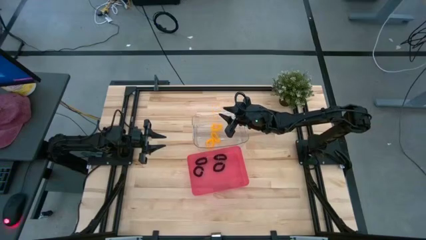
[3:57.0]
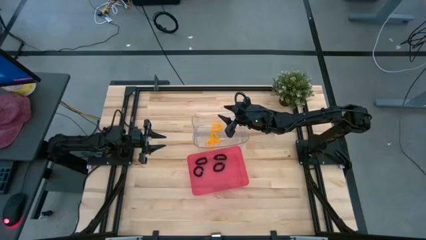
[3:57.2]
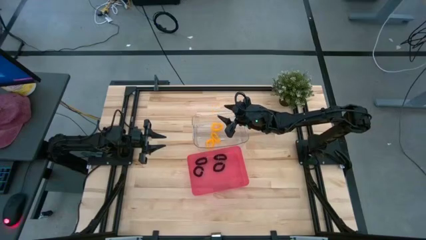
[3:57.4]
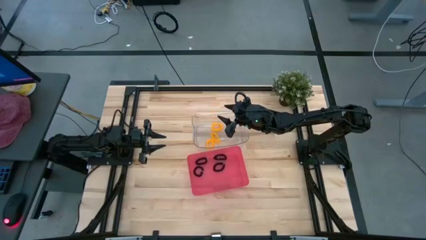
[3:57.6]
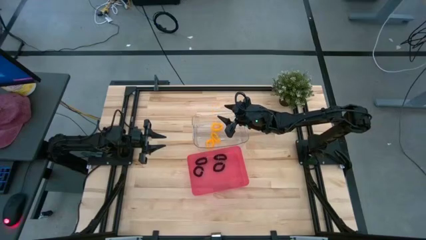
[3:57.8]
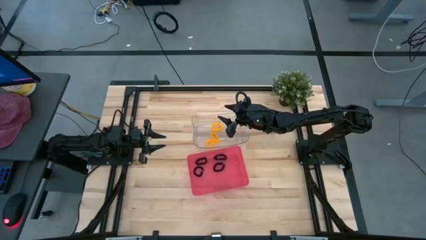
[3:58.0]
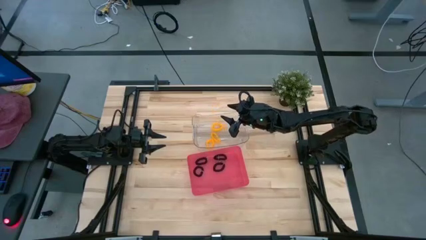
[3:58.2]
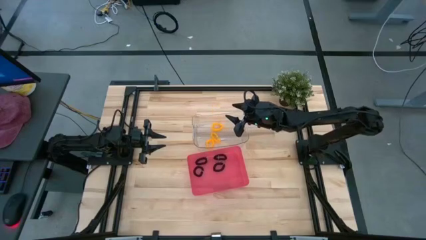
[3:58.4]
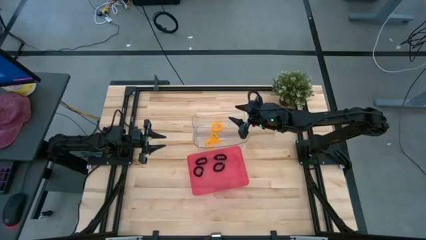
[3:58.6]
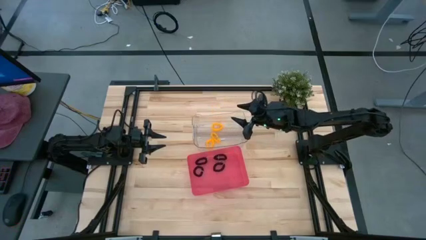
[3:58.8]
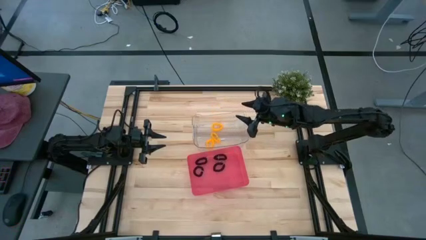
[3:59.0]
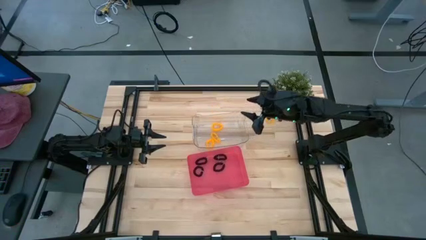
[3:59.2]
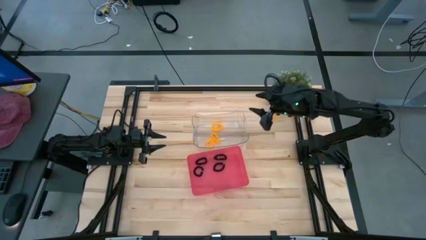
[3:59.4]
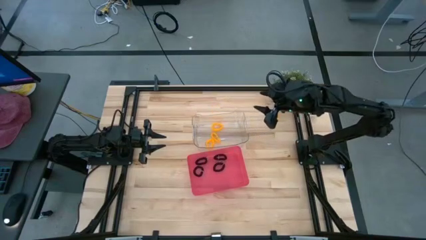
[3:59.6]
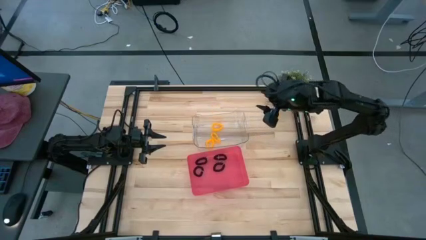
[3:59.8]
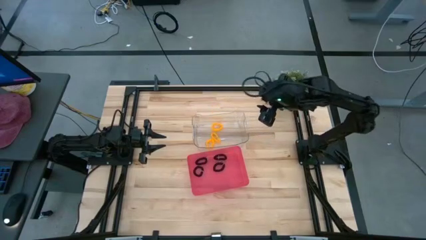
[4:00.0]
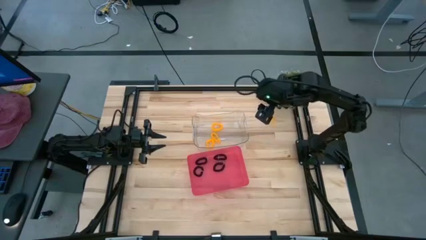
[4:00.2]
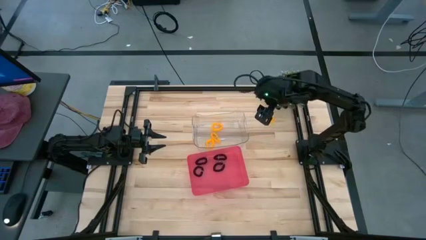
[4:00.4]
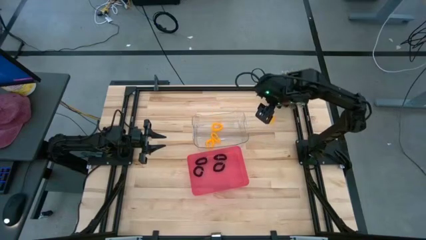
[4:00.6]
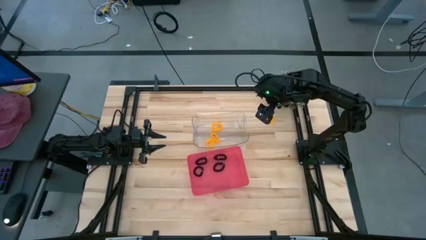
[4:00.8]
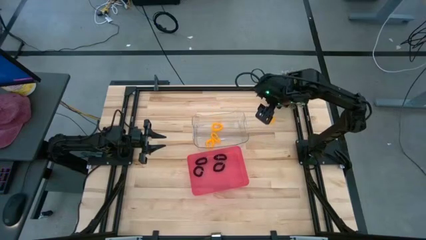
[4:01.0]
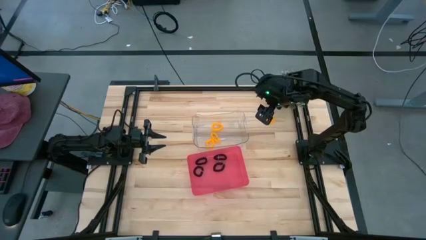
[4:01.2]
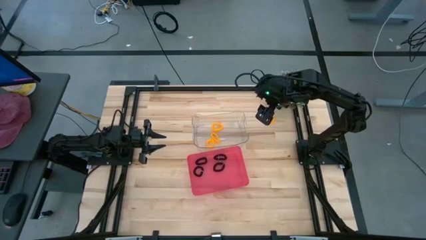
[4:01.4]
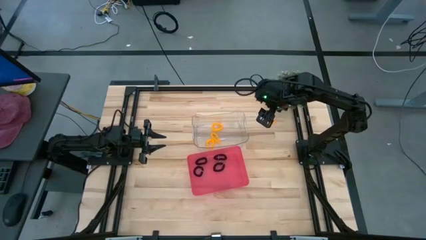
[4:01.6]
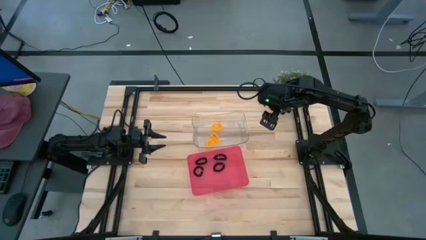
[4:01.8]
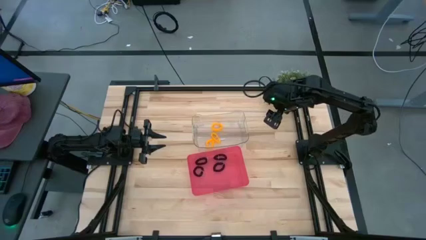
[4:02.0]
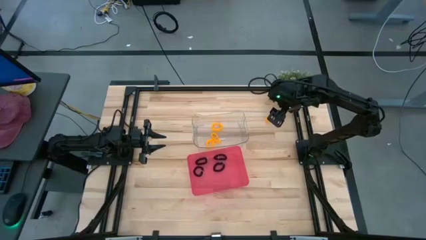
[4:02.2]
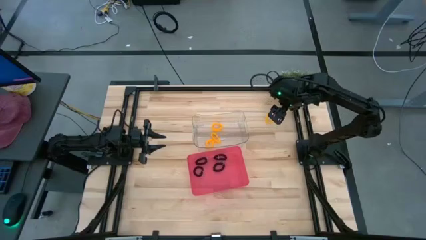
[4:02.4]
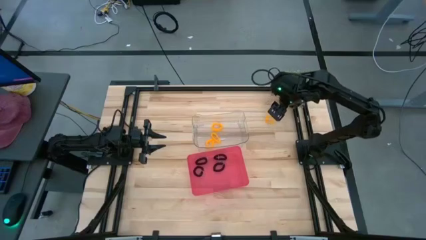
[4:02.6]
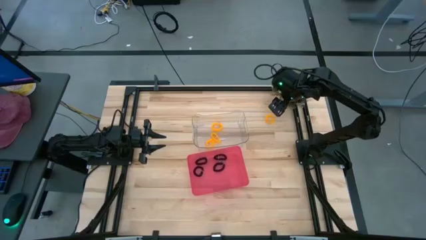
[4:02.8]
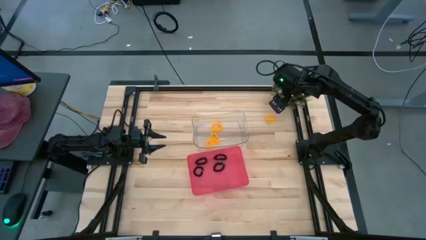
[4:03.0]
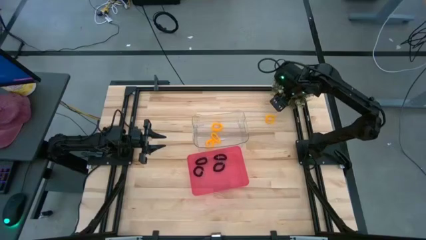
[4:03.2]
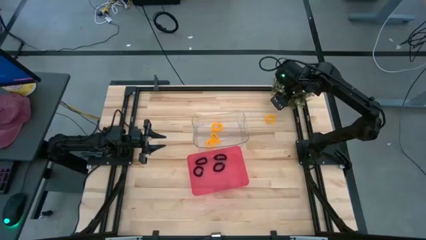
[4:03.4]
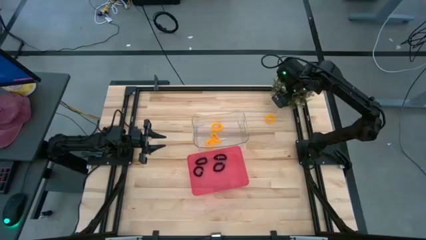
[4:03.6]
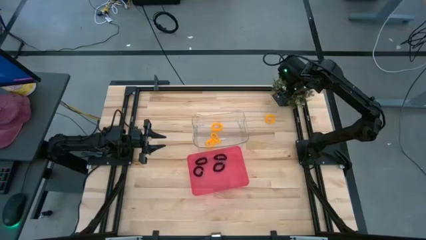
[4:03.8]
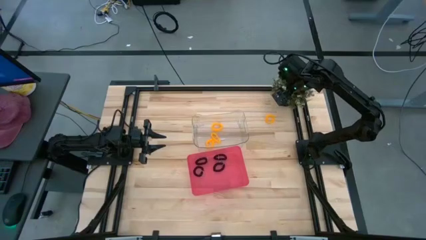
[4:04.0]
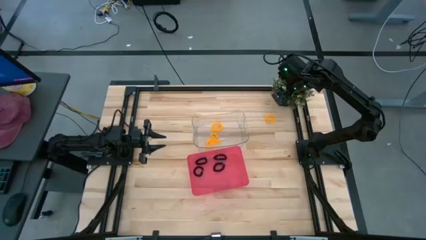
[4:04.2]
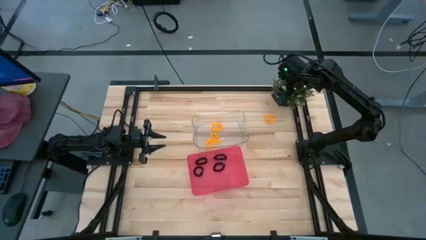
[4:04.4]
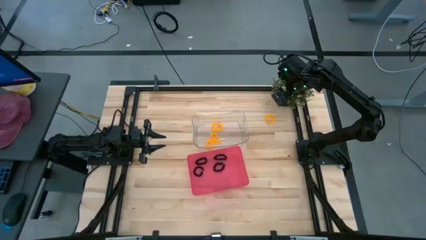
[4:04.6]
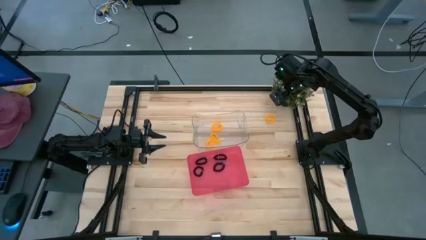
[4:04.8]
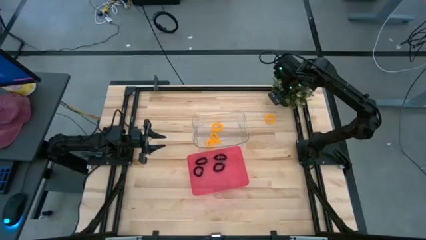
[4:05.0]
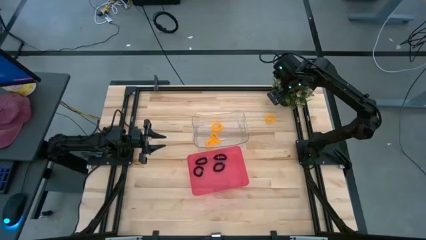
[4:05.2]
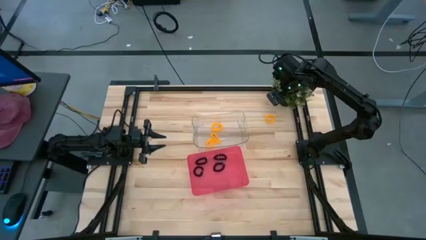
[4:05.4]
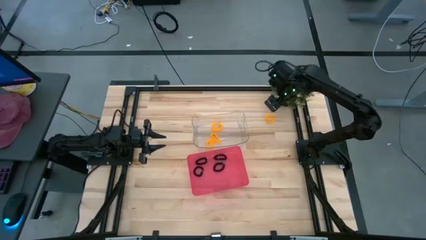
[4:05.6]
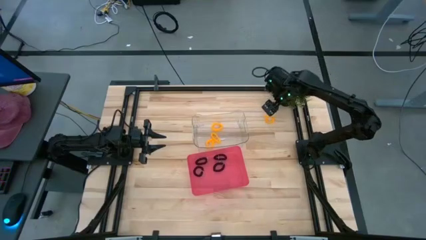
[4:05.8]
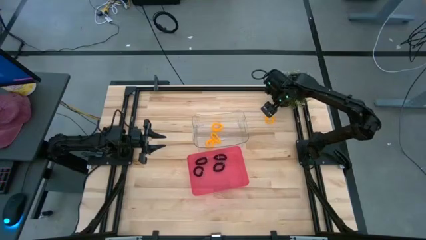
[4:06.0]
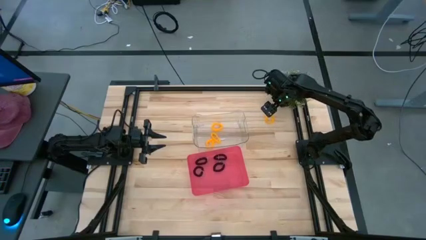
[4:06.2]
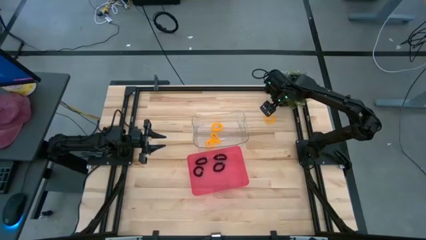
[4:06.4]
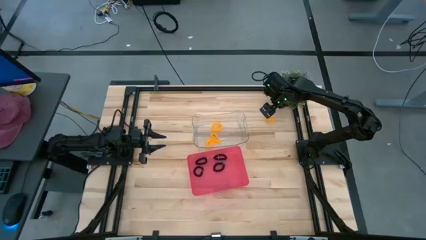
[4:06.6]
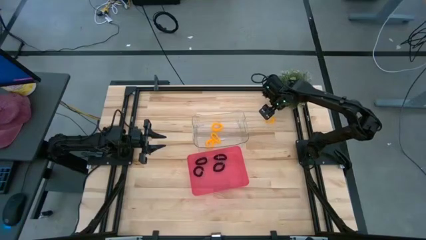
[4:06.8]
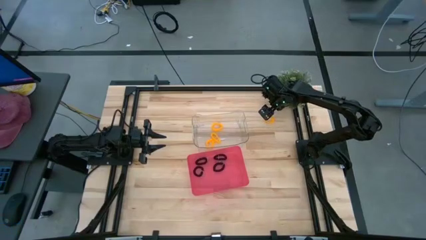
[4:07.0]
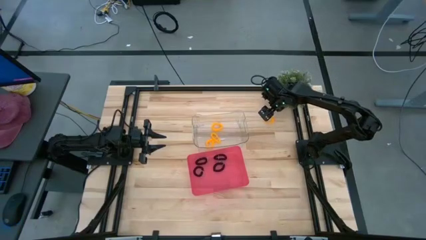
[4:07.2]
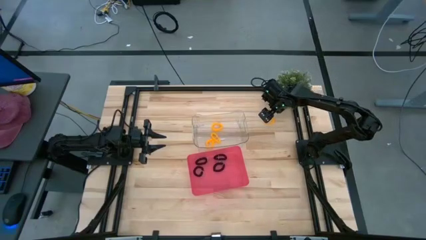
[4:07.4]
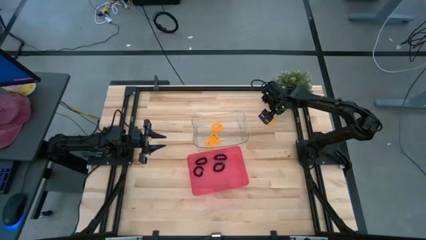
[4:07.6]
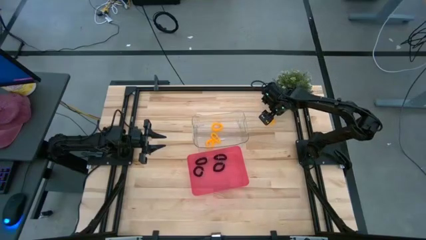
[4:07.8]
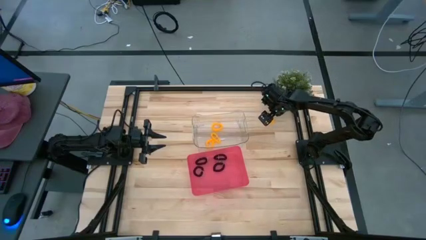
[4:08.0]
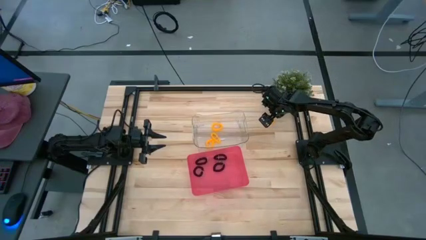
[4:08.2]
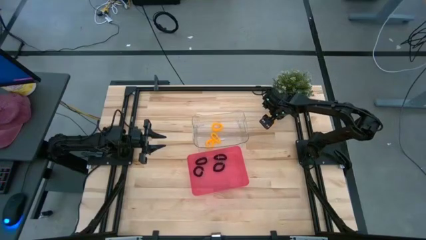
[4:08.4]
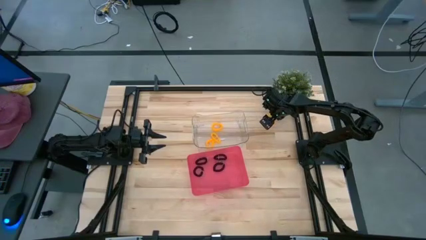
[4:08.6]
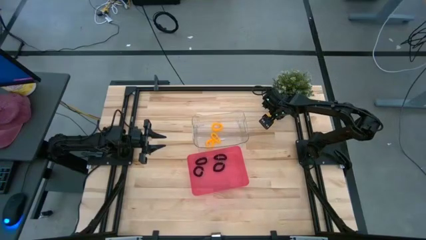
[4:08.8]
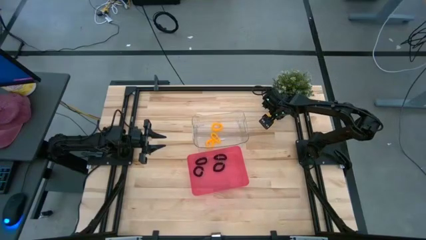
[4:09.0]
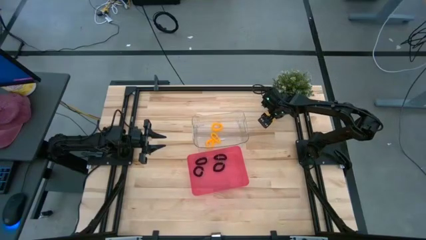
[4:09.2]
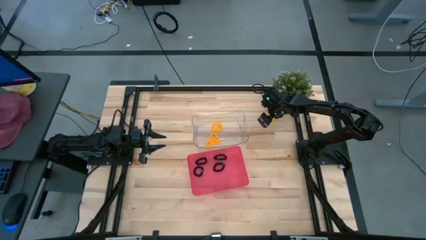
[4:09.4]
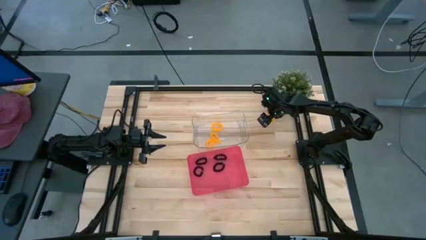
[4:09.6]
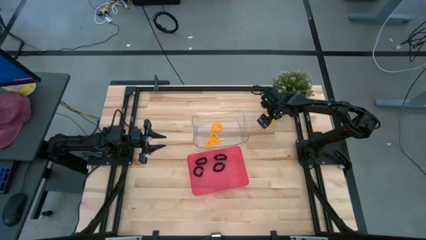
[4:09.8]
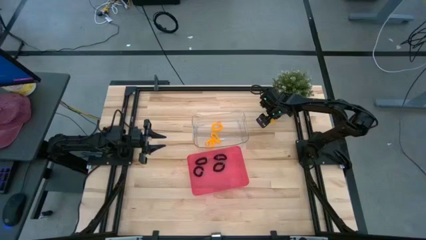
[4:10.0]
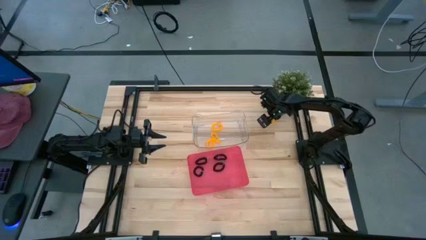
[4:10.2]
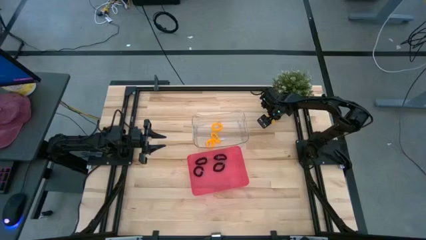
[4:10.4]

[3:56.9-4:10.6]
Task: Sort spring keychains
Put the yellow spring keychain into the transparent bin
